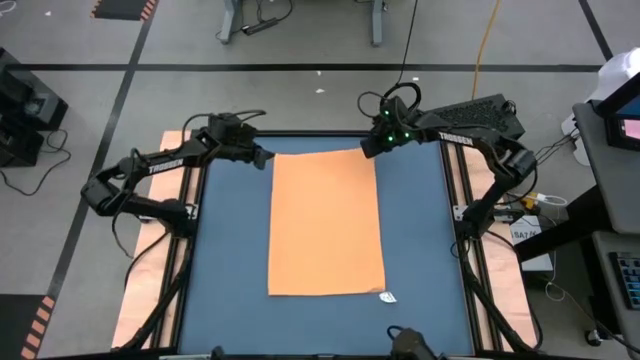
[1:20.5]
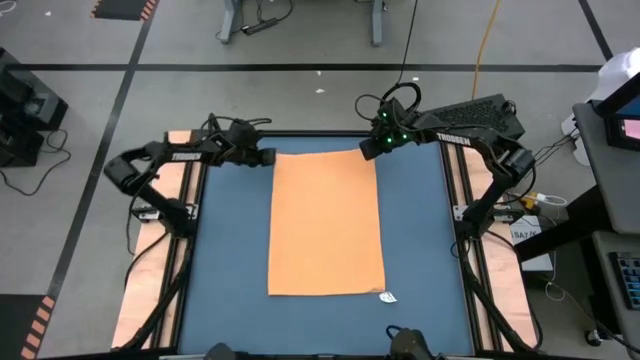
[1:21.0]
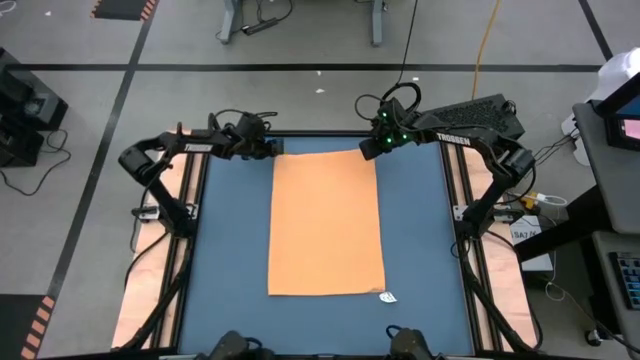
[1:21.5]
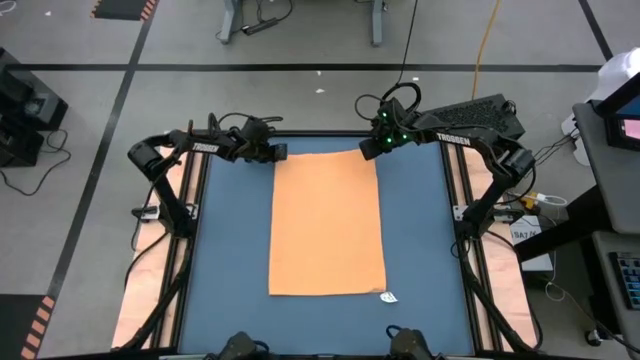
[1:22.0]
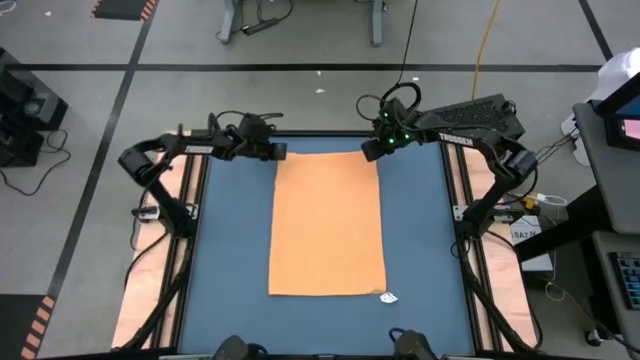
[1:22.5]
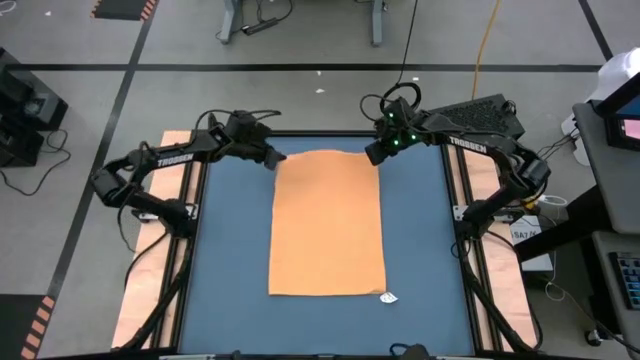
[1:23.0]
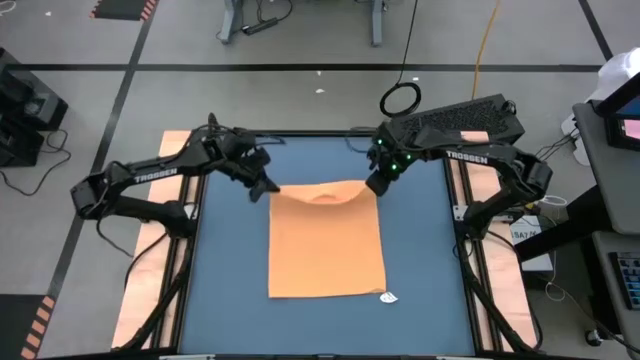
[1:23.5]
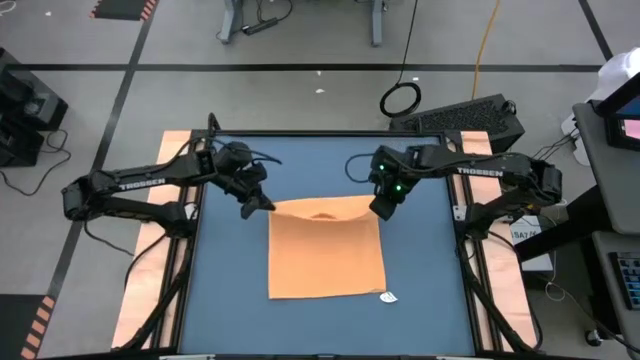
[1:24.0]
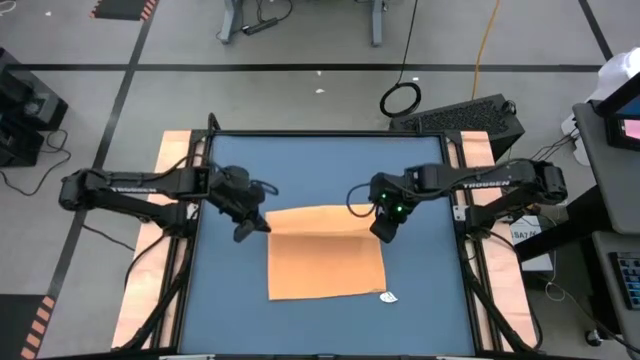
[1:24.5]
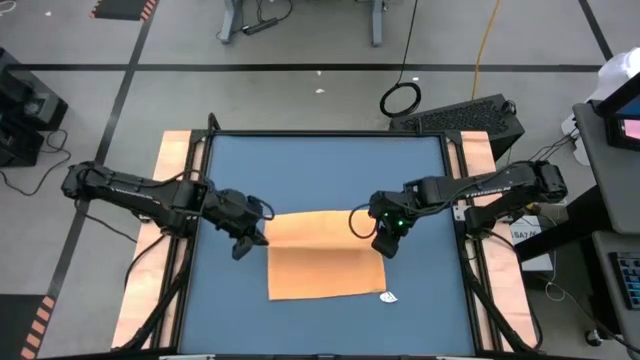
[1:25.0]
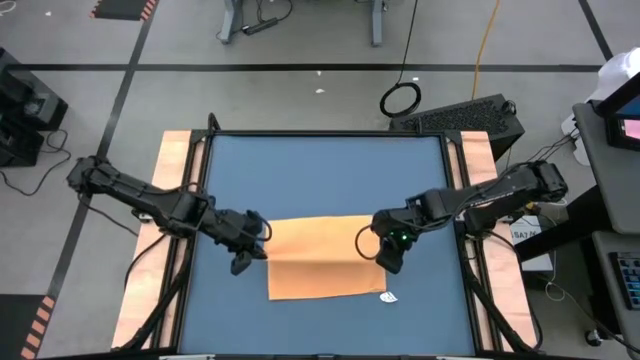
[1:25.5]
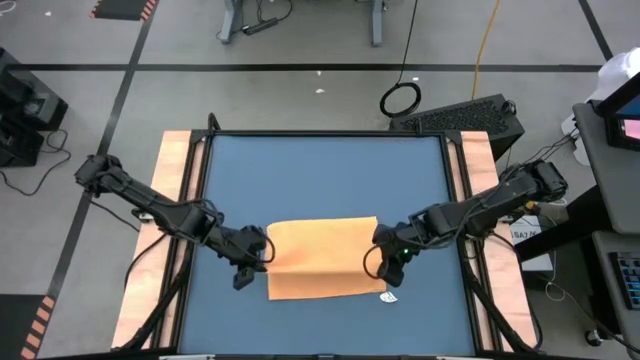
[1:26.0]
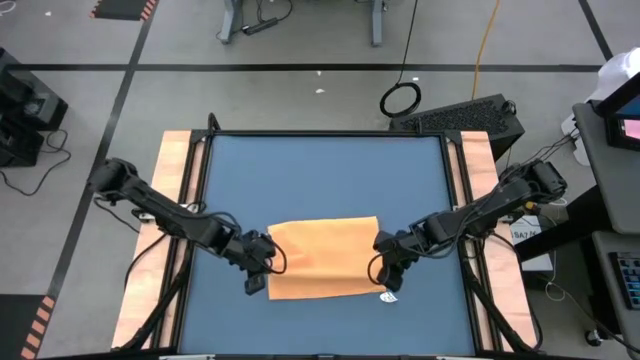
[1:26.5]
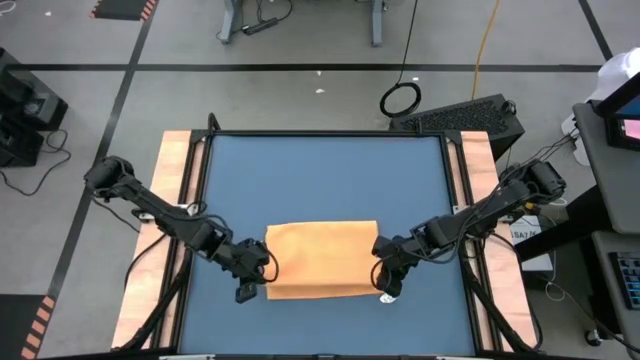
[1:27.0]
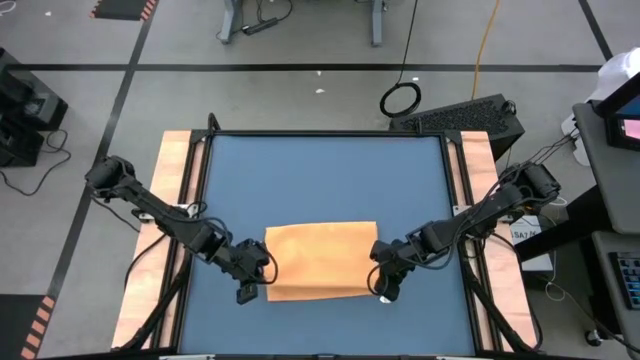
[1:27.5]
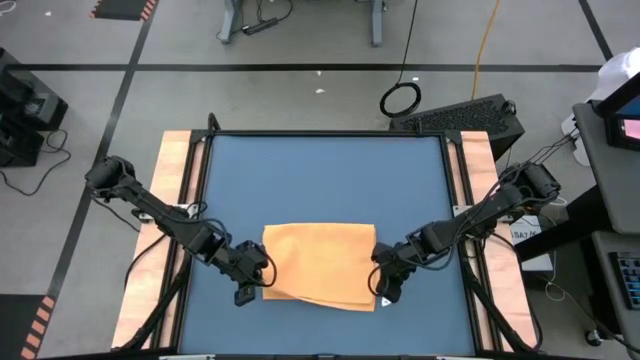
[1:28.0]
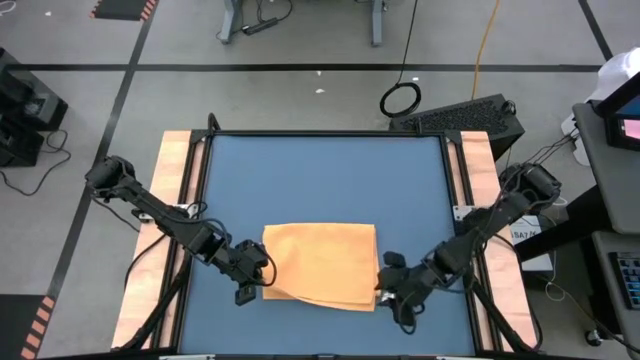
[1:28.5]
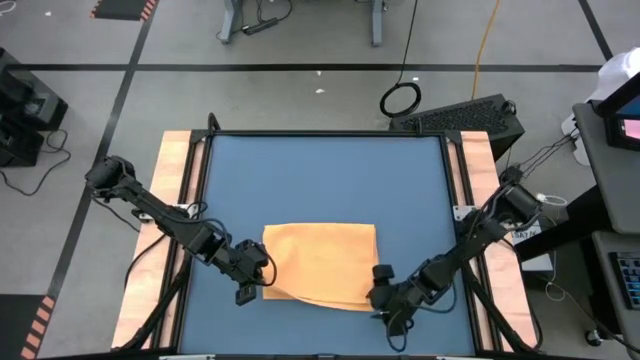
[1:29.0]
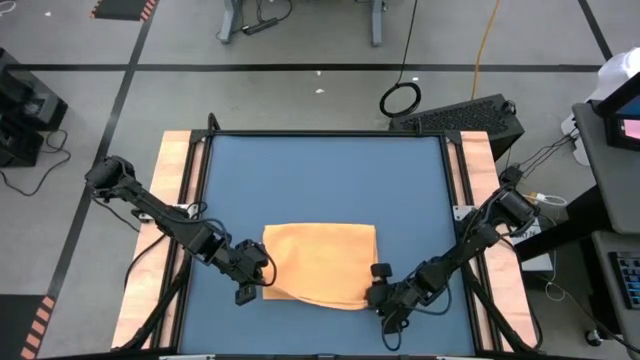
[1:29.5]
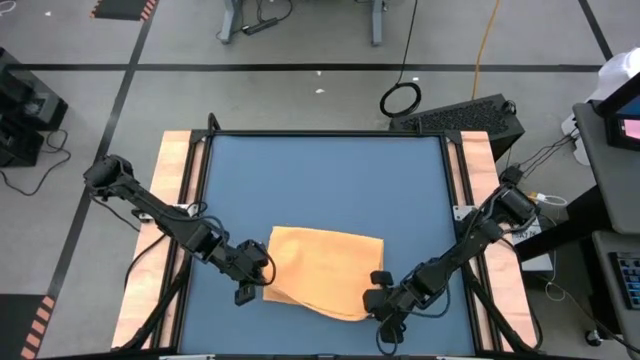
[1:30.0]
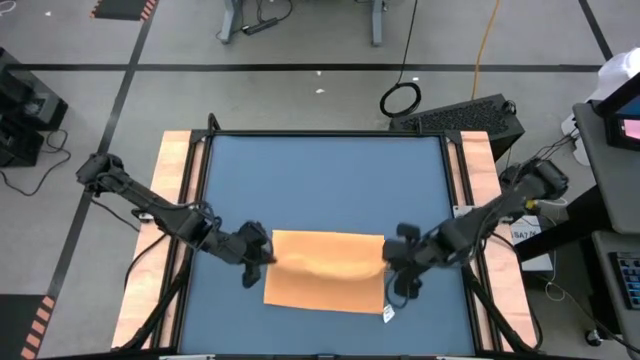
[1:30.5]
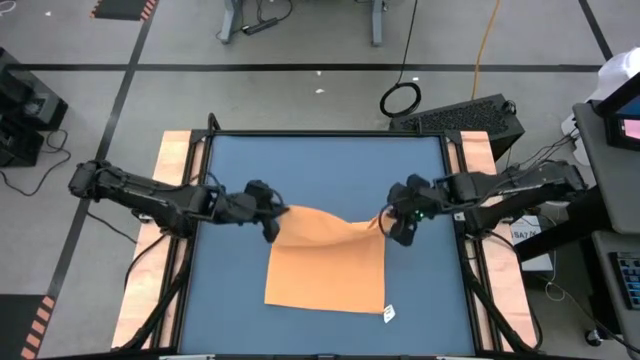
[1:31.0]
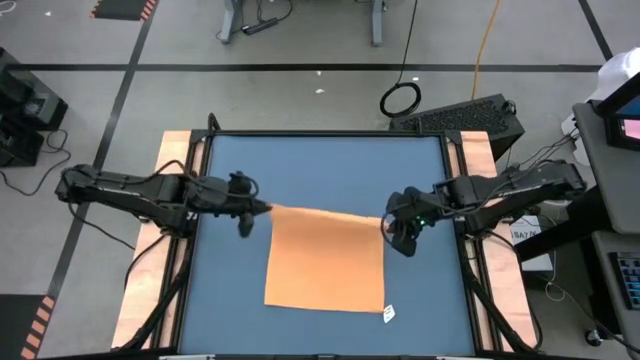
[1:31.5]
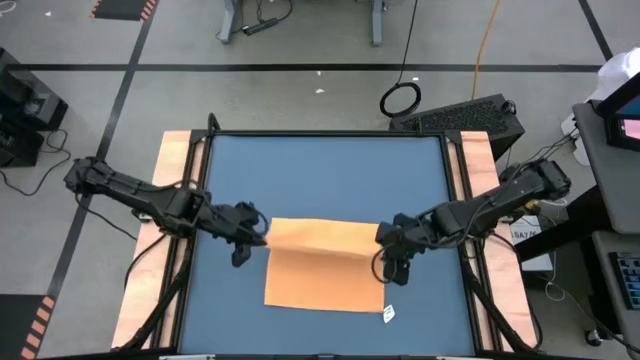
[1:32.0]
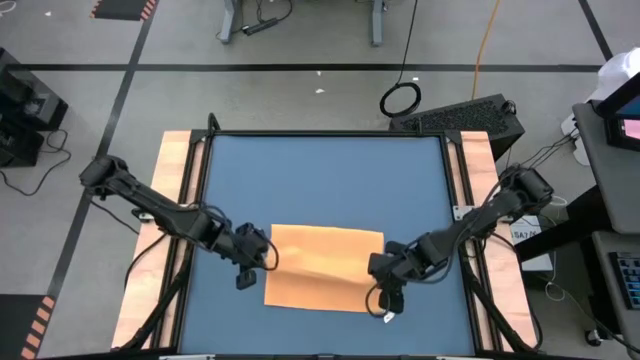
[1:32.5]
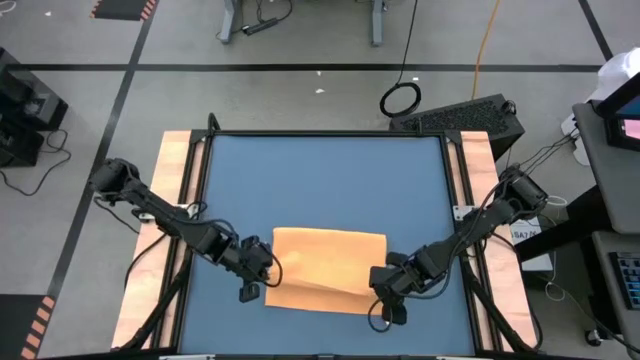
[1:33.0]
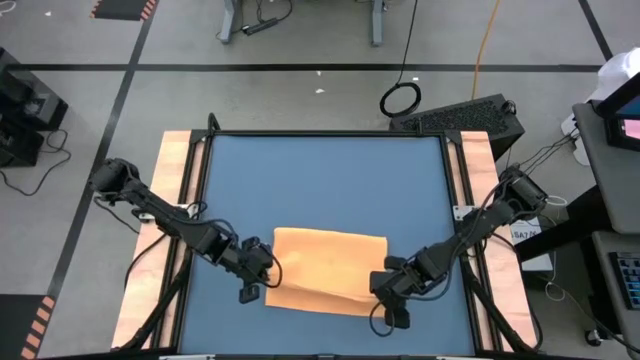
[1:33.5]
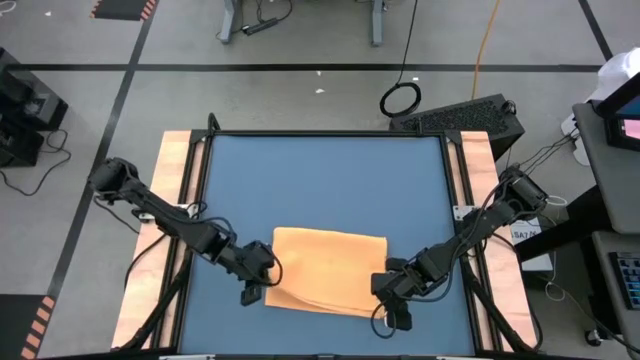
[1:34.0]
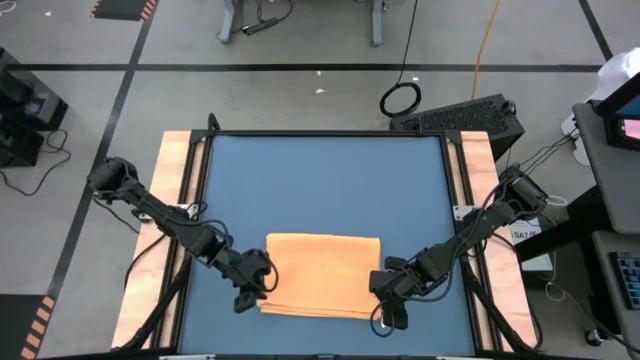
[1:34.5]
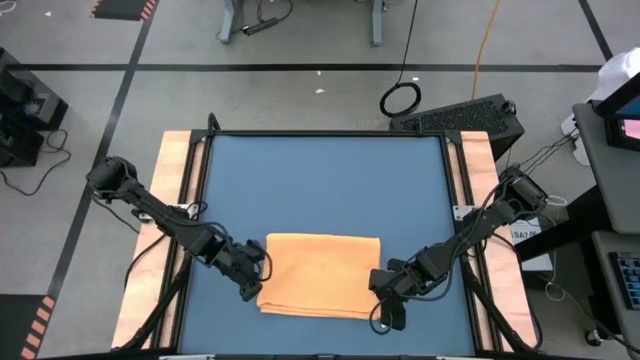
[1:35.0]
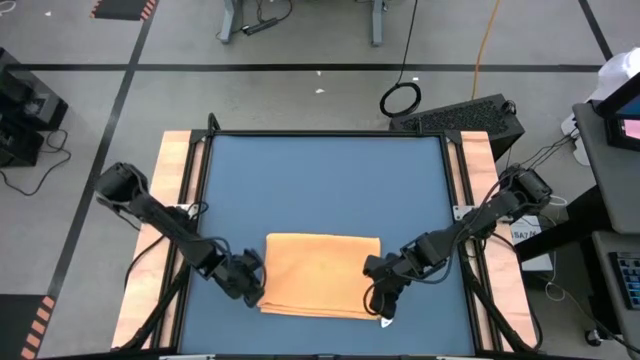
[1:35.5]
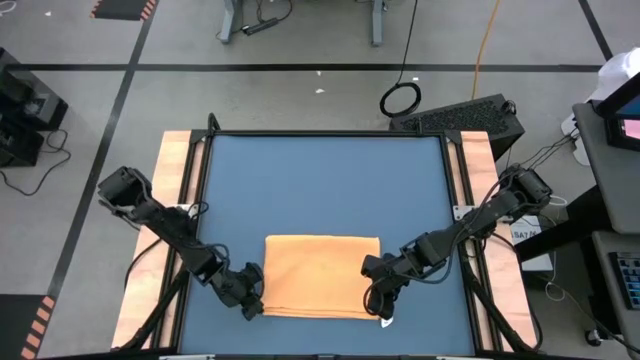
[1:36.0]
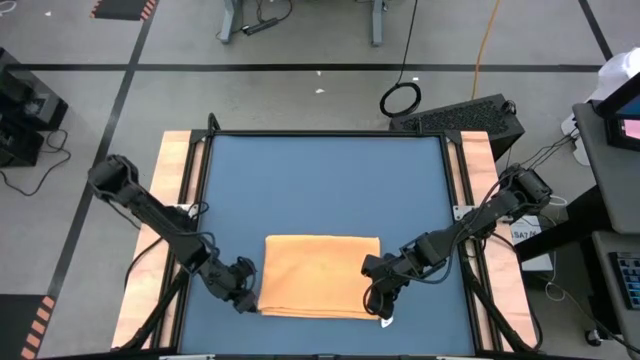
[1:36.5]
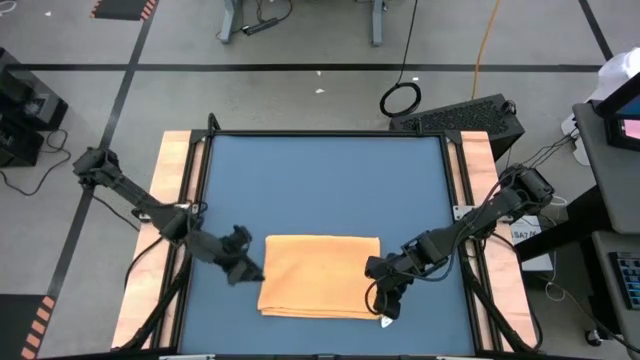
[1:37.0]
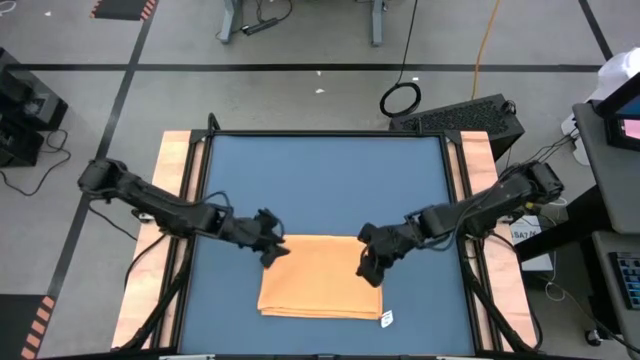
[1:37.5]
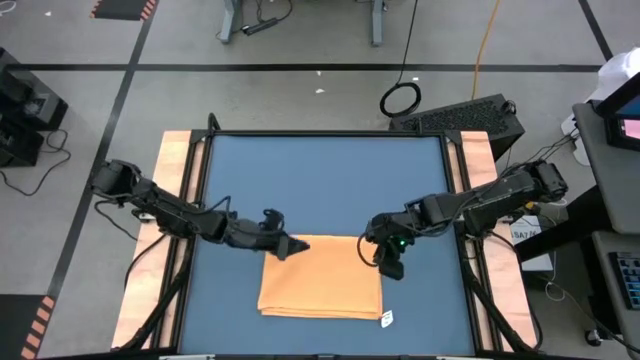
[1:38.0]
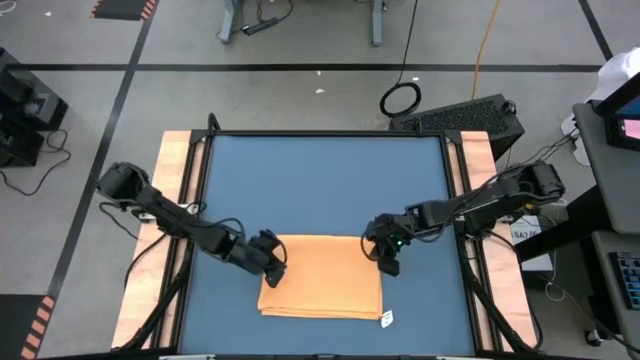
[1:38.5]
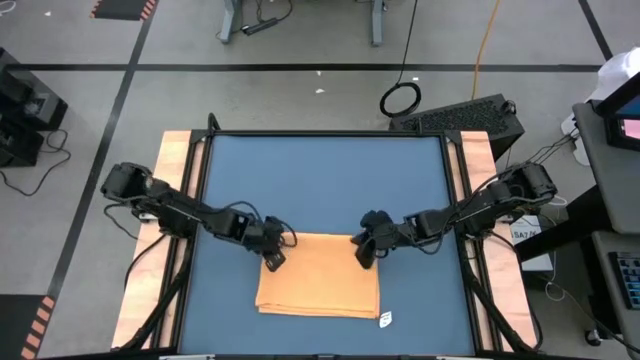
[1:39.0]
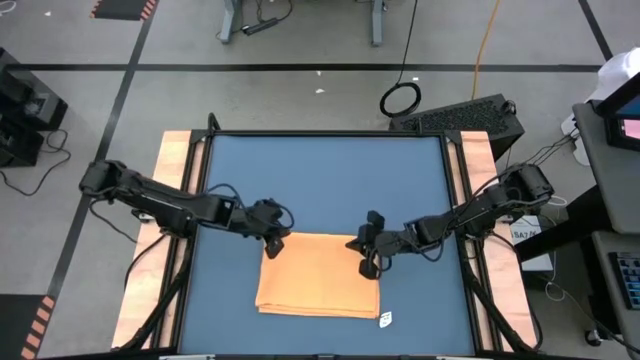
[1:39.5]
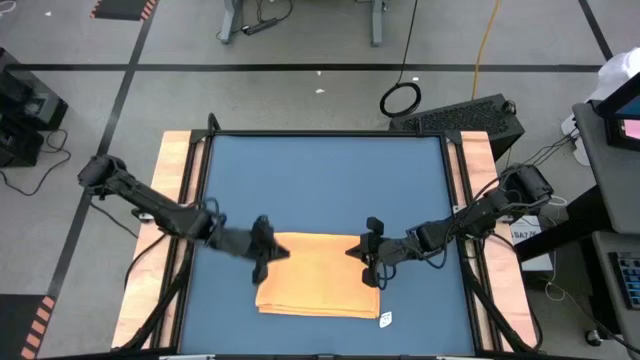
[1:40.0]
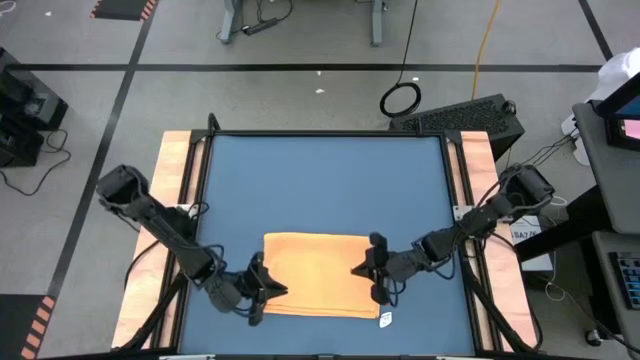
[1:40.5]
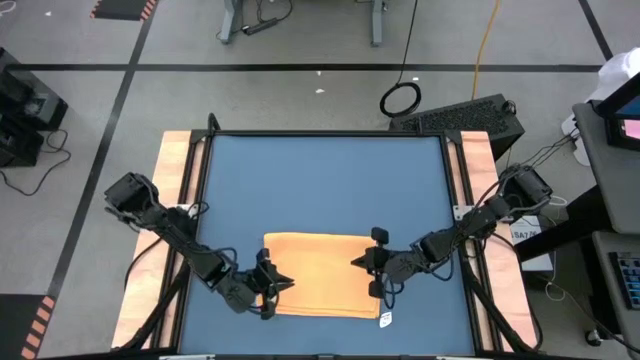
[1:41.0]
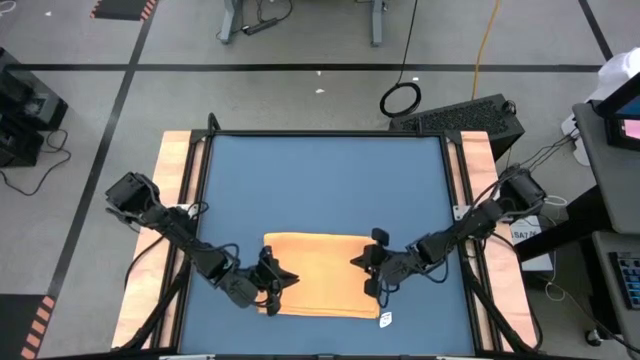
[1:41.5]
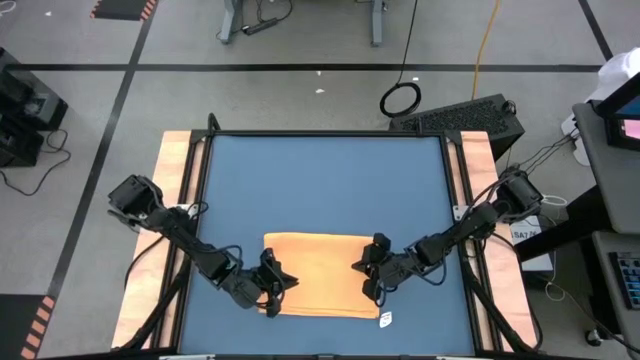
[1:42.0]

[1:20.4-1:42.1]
Task: Roll towel
Roll the yellow towel
